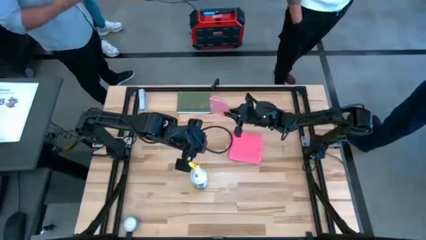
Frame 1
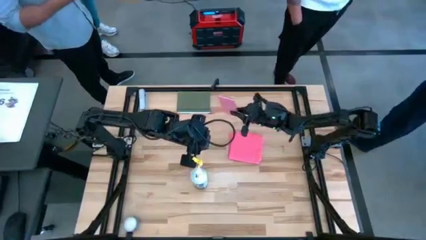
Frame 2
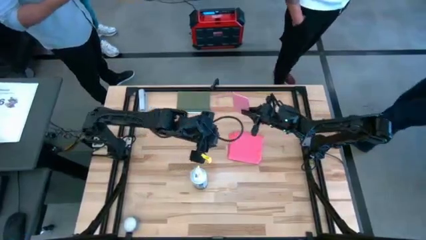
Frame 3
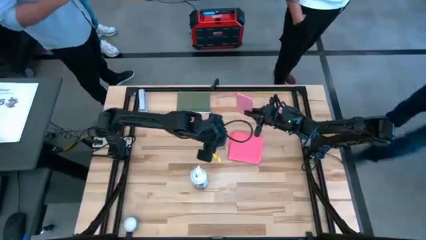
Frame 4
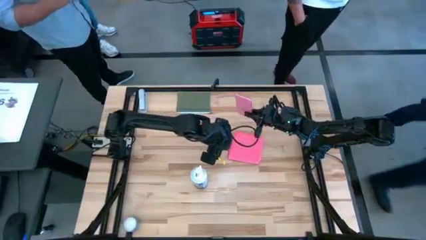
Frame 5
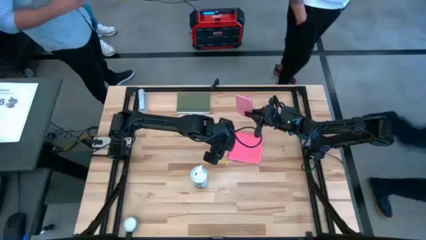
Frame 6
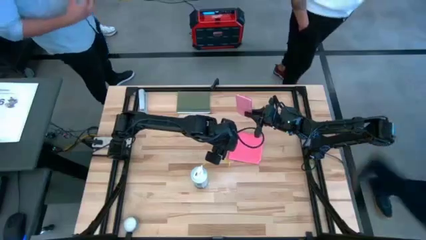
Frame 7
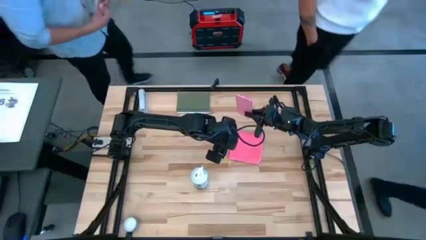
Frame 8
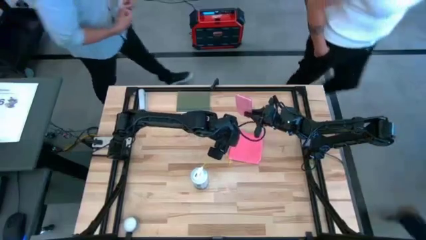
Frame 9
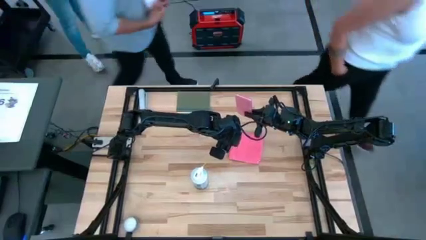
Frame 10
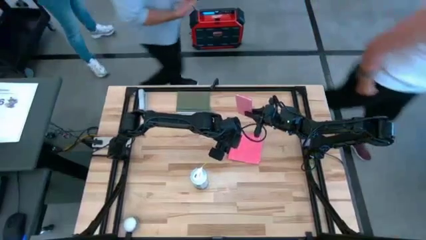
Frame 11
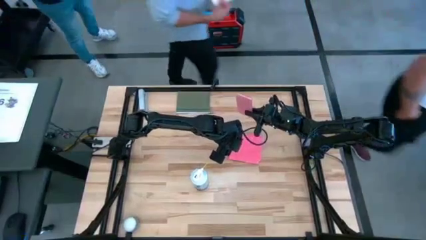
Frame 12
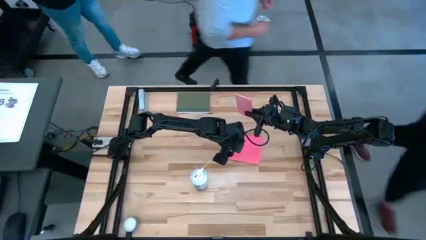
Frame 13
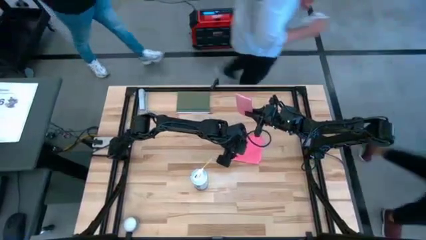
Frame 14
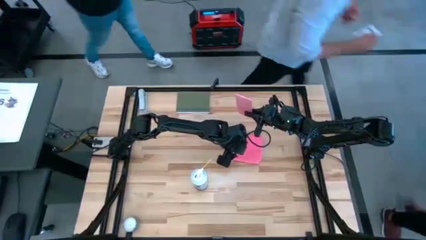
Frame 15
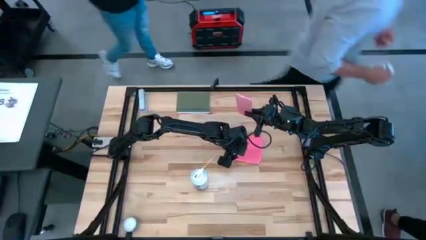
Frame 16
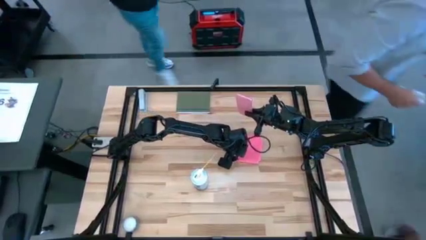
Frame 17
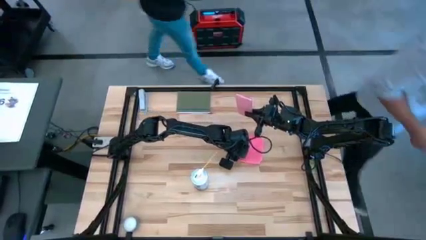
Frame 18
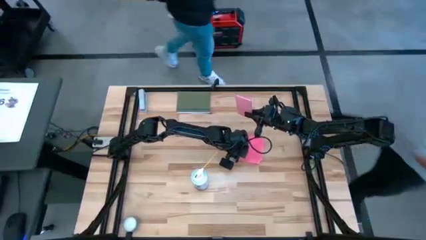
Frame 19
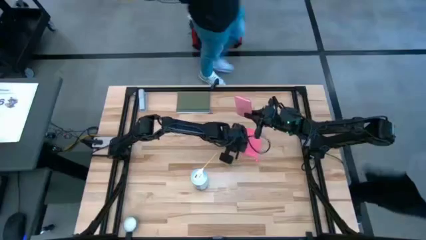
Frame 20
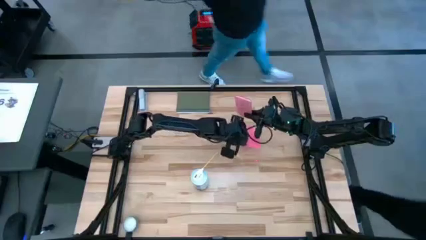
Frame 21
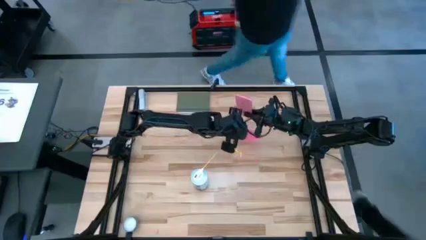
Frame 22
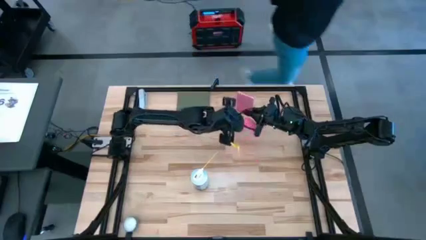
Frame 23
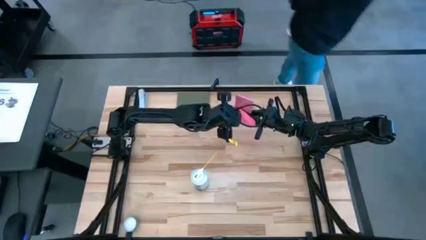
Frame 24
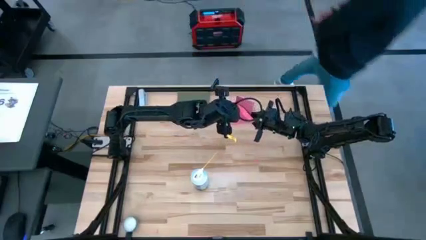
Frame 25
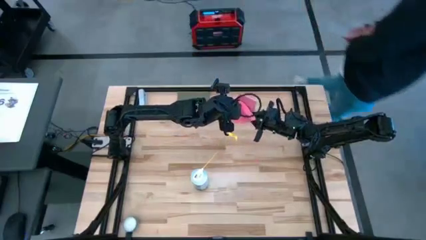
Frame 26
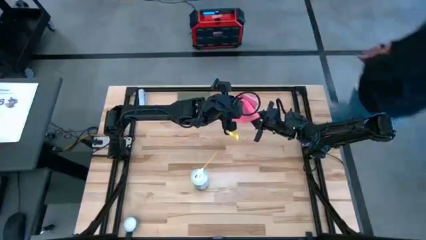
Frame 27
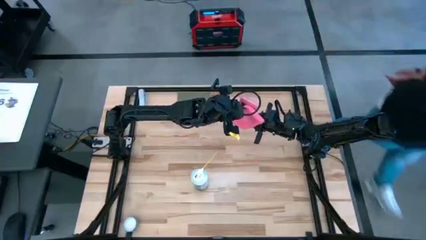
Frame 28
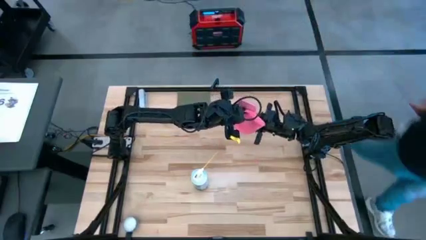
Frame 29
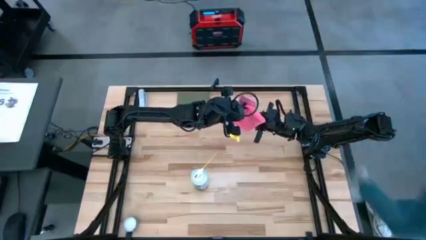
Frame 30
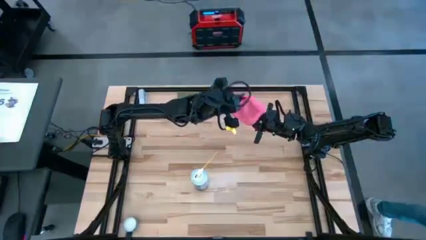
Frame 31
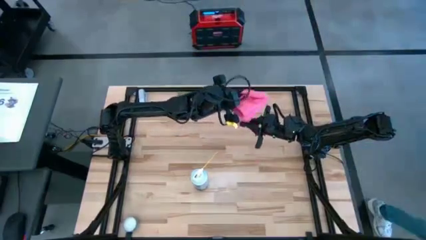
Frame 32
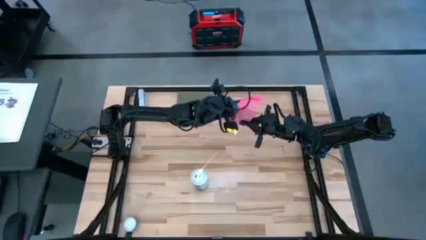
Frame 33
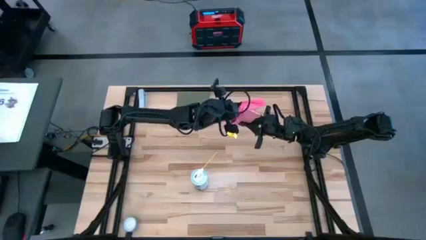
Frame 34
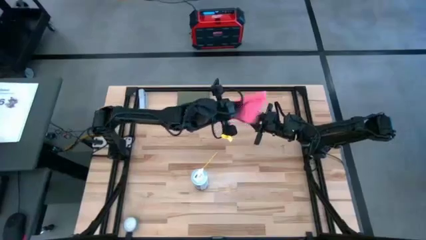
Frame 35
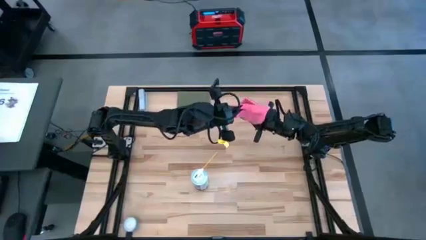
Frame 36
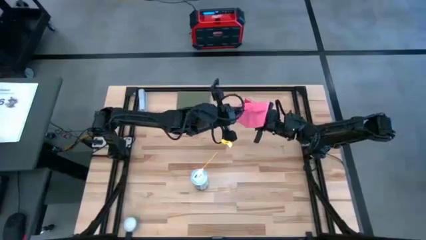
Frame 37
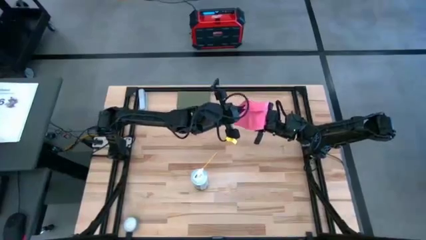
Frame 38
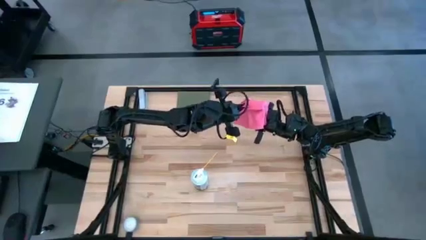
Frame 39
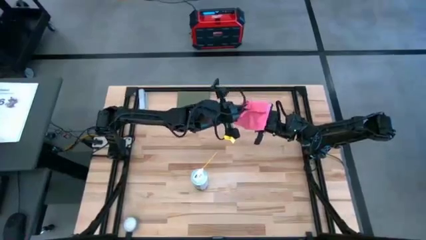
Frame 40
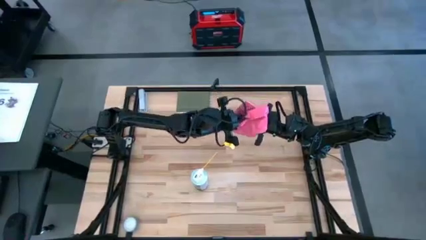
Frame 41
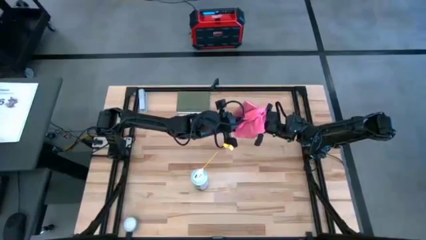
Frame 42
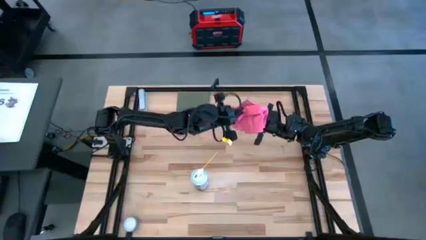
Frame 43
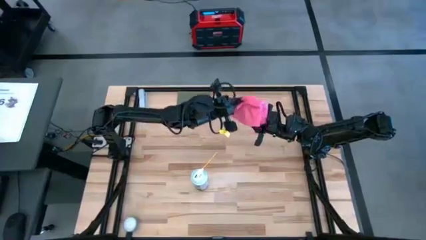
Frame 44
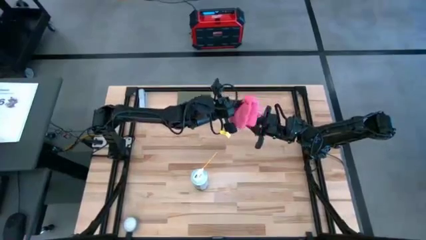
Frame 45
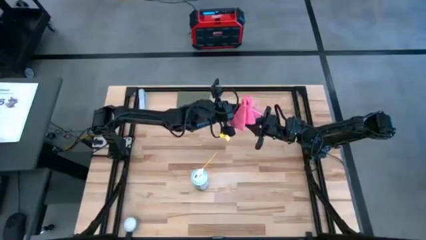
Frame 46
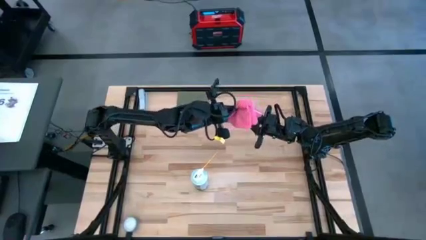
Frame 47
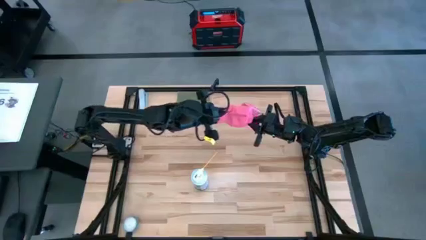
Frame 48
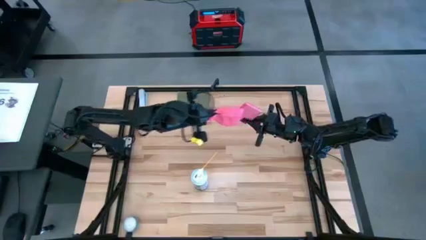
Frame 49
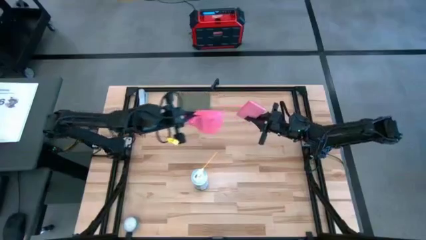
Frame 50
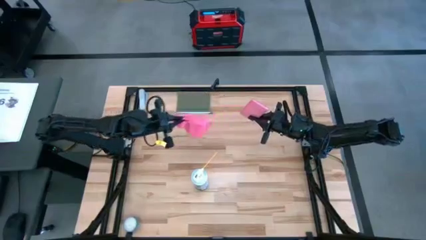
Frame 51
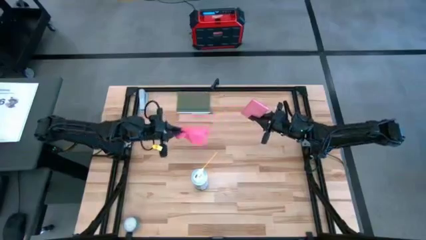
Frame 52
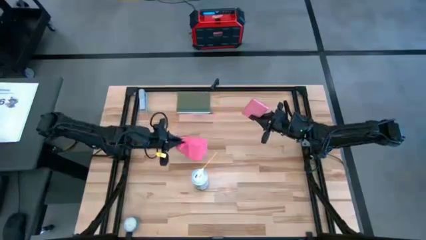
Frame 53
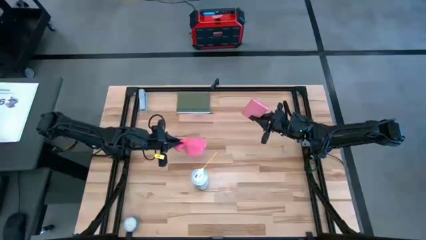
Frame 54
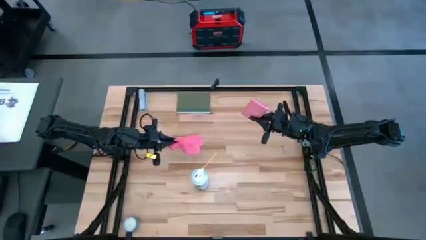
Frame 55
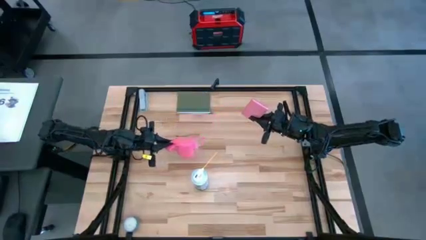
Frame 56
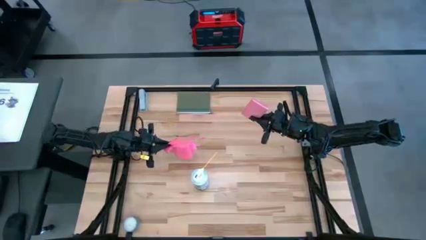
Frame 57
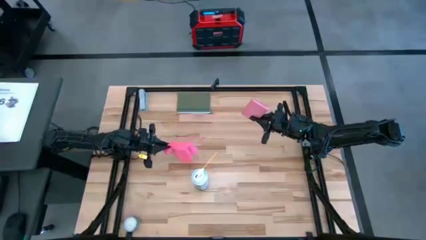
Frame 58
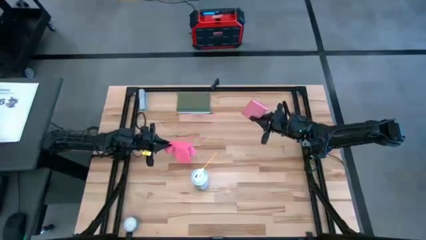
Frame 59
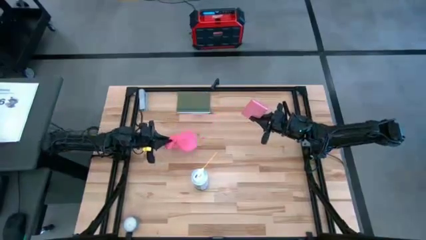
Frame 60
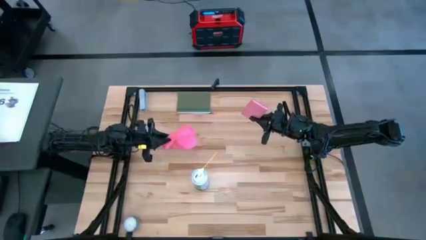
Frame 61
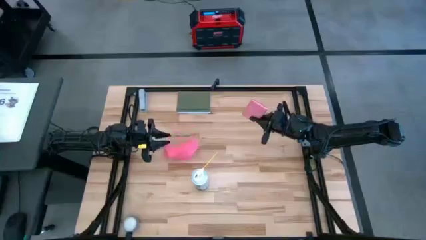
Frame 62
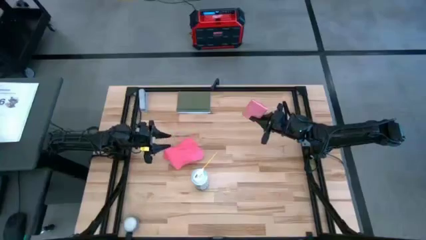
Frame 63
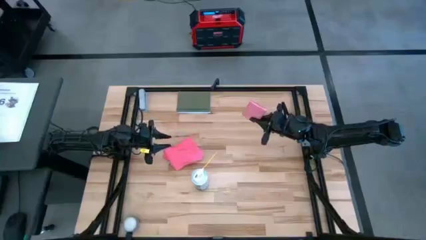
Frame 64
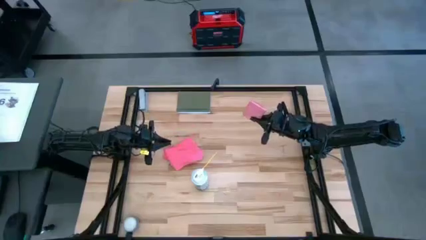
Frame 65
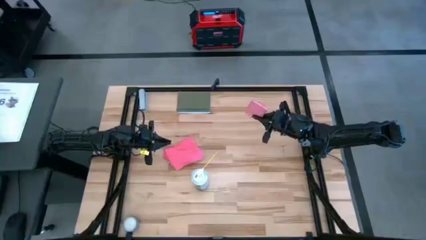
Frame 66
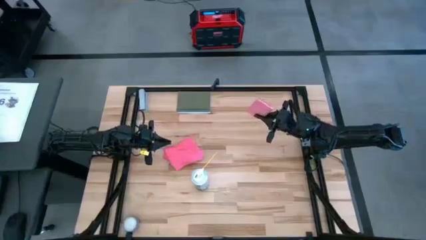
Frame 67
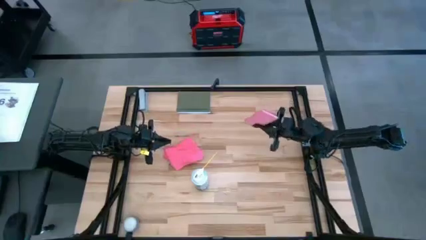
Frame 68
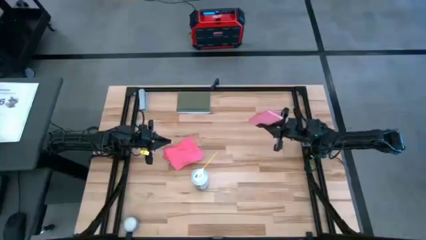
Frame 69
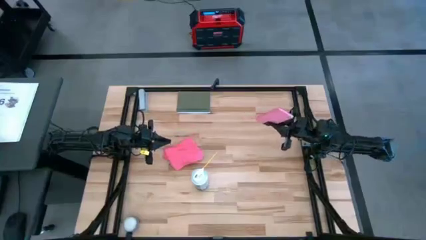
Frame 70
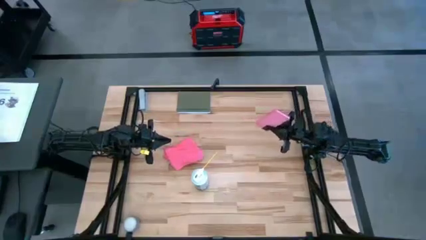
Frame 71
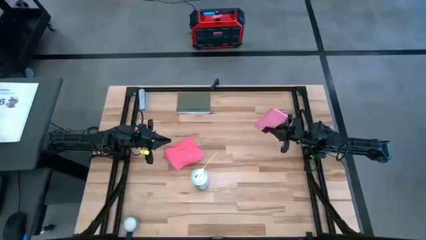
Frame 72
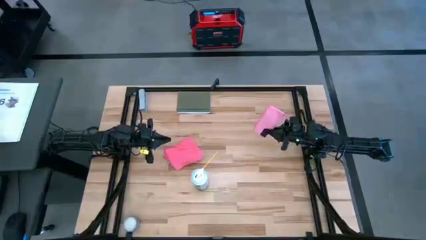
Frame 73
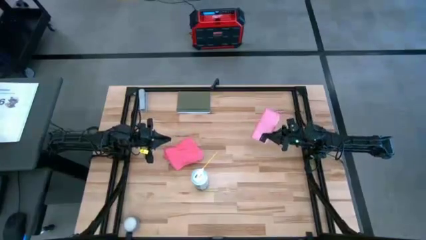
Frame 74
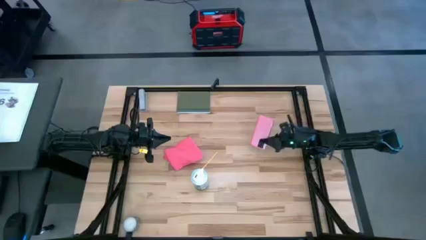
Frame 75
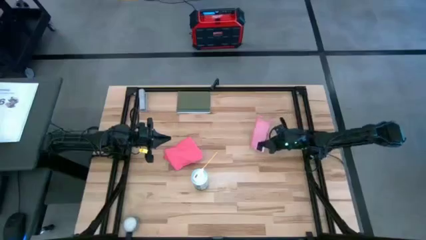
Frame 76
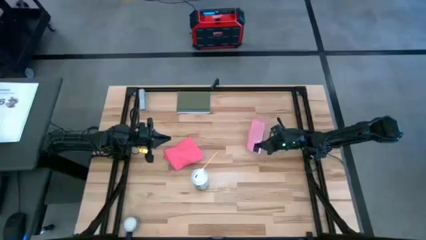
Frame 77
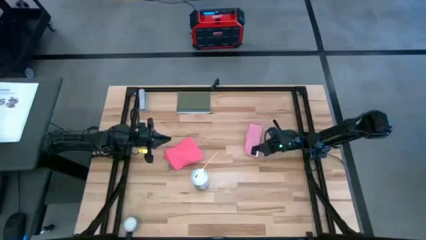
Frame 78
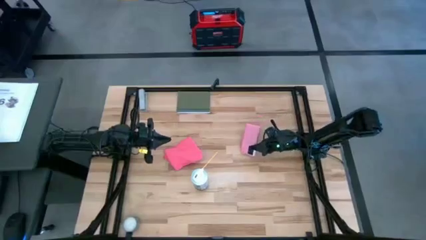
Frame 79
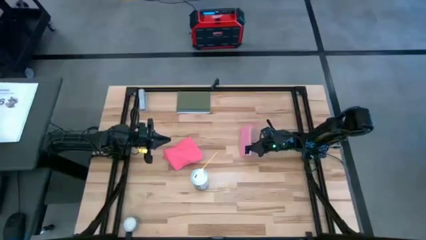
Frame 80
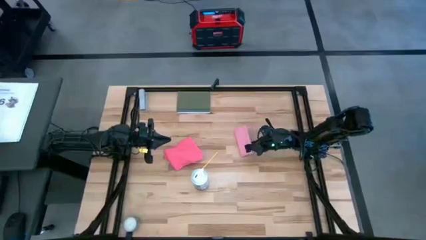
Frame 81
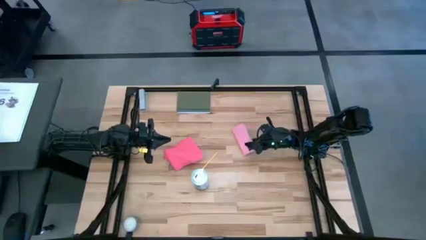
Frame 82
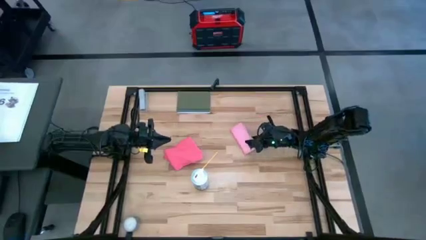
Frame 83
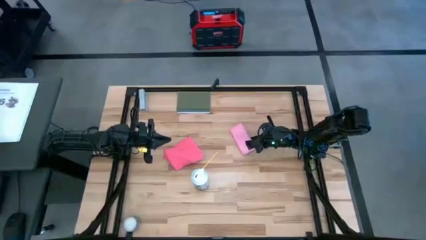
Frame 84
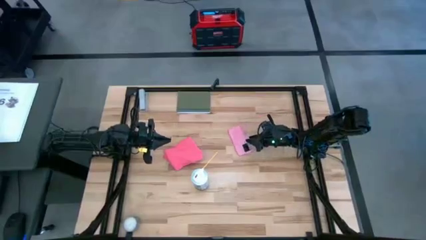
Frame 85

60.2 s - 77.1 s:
Task: Apply microfiber cloth
Wipe the back of the pink cellphone with the pink microfiber towel
